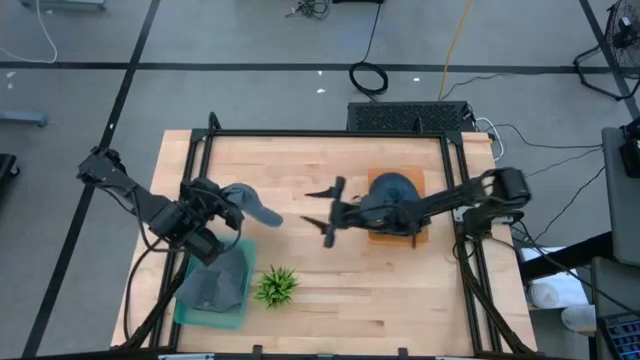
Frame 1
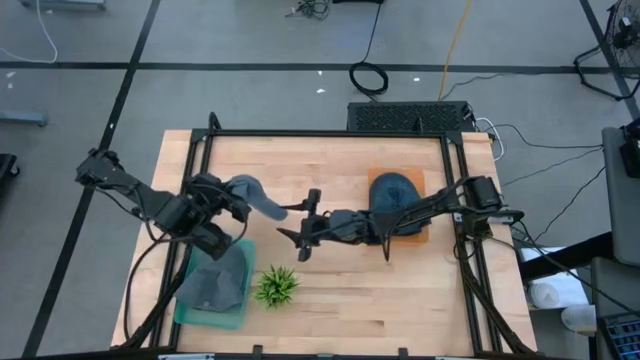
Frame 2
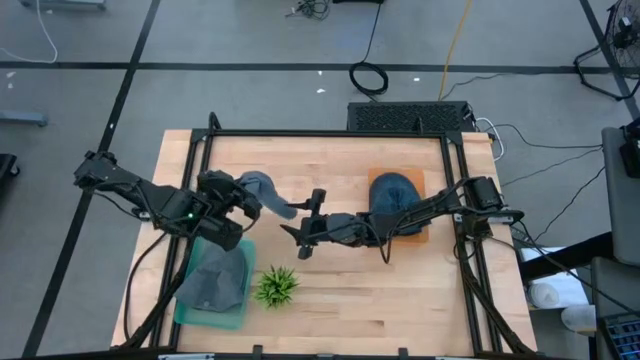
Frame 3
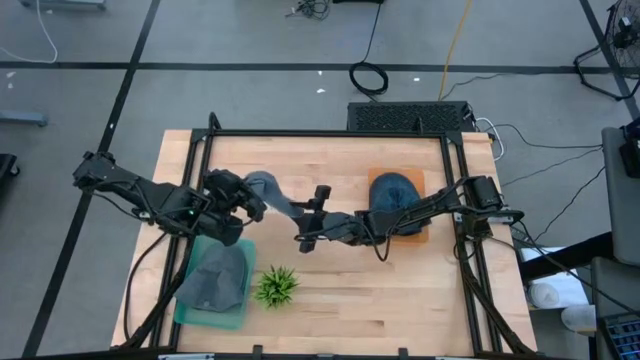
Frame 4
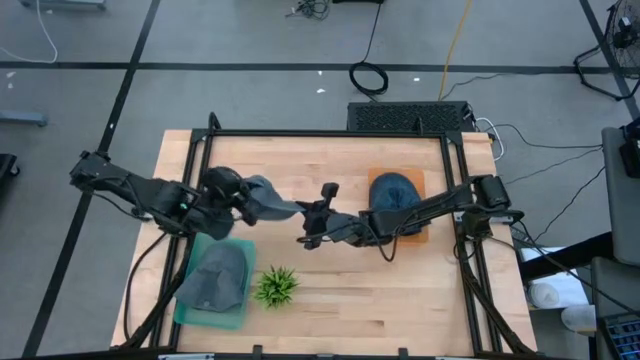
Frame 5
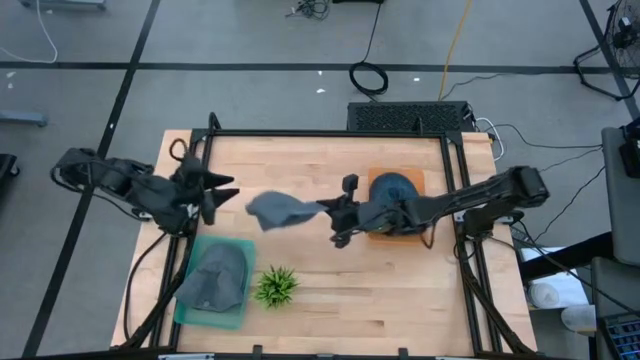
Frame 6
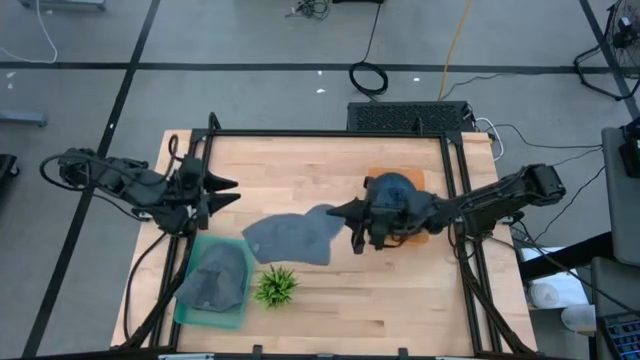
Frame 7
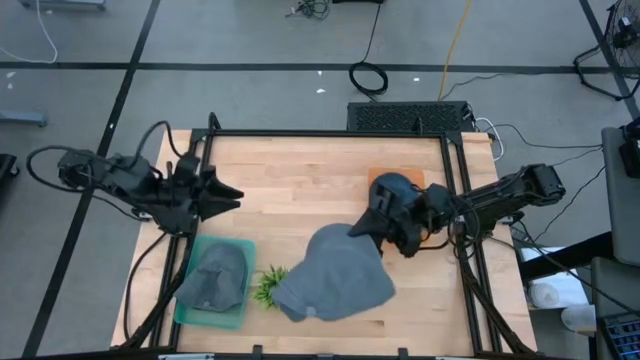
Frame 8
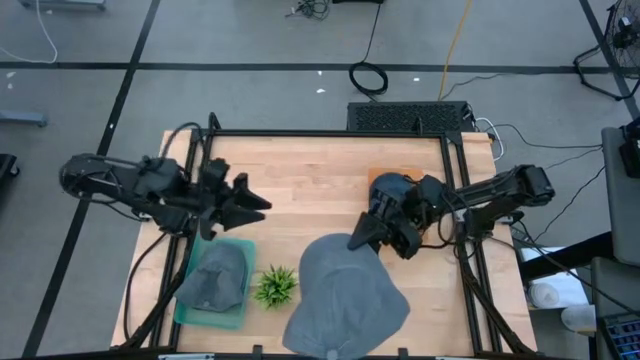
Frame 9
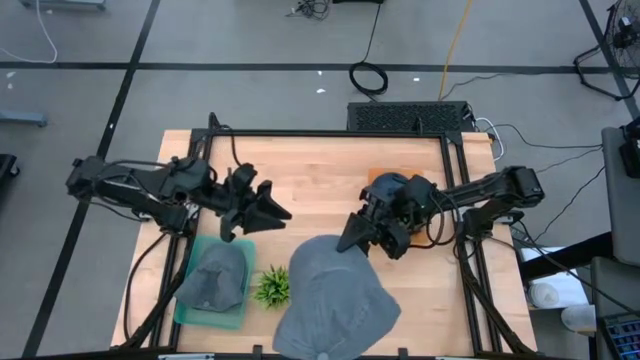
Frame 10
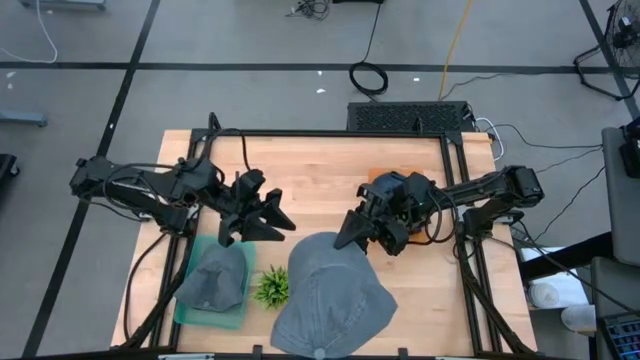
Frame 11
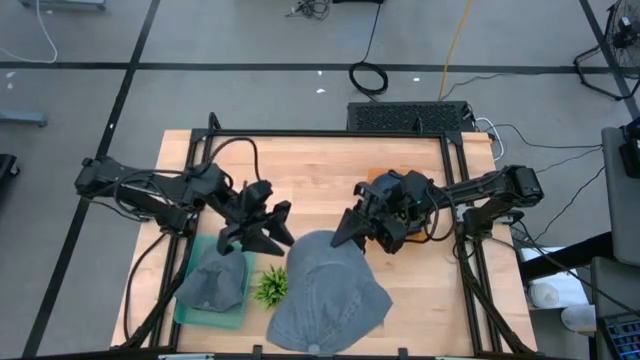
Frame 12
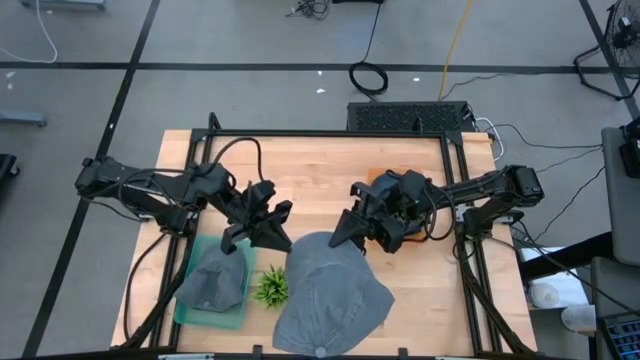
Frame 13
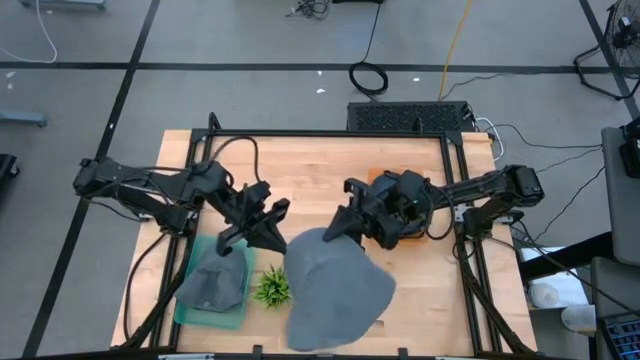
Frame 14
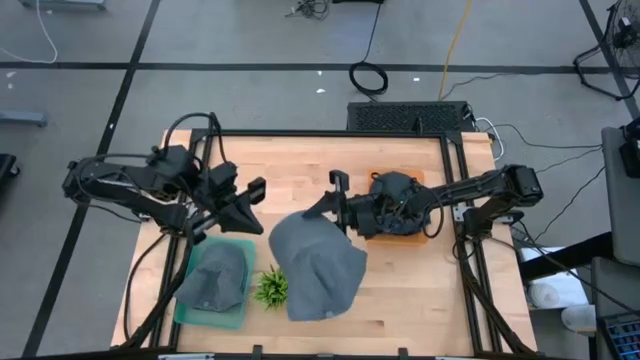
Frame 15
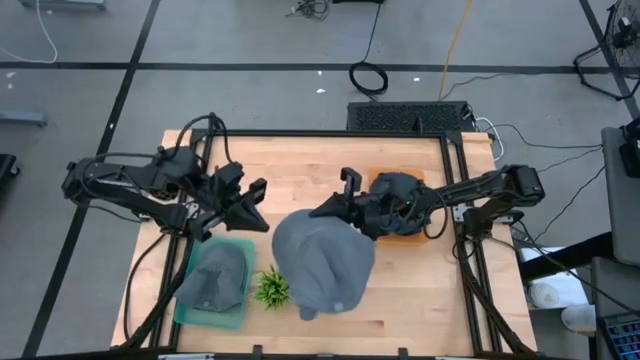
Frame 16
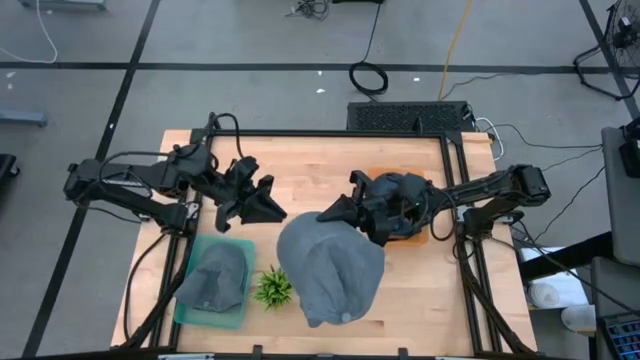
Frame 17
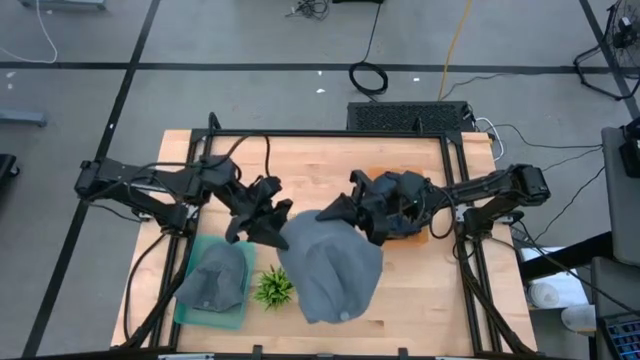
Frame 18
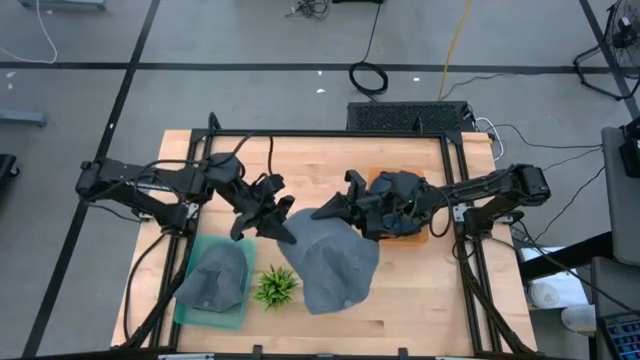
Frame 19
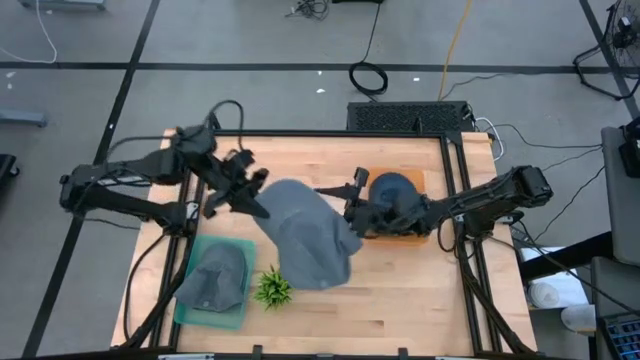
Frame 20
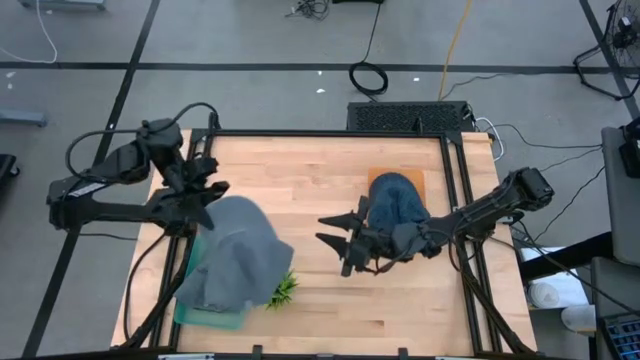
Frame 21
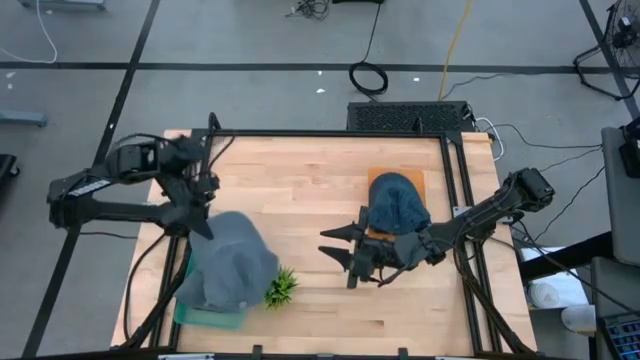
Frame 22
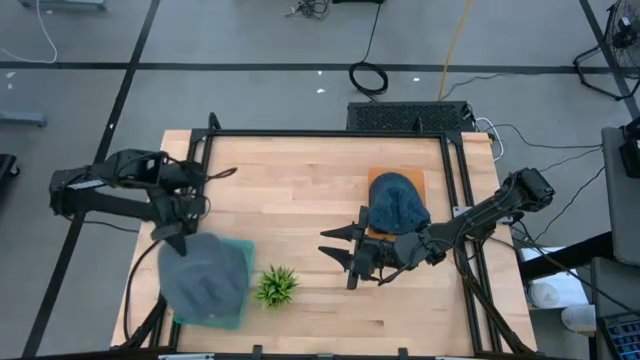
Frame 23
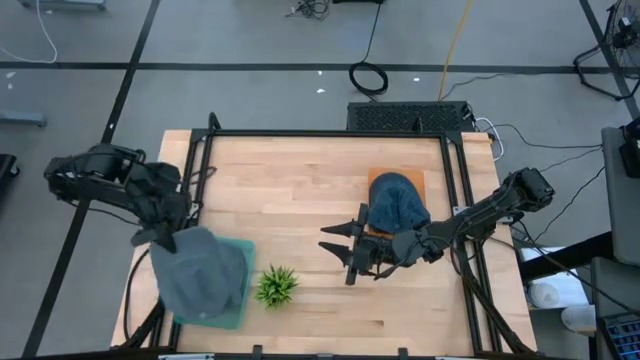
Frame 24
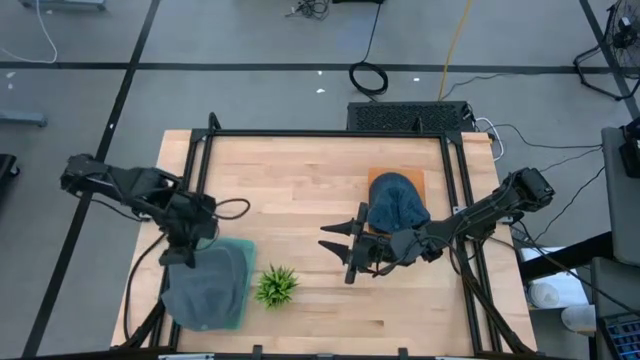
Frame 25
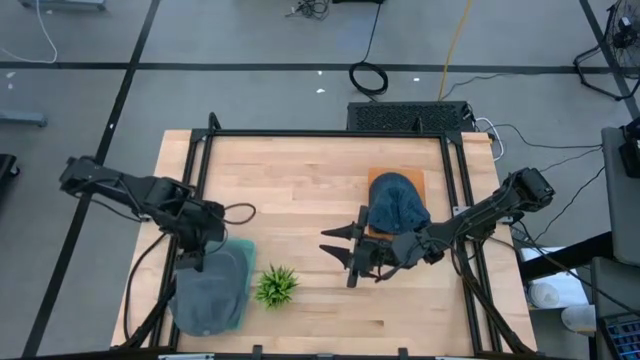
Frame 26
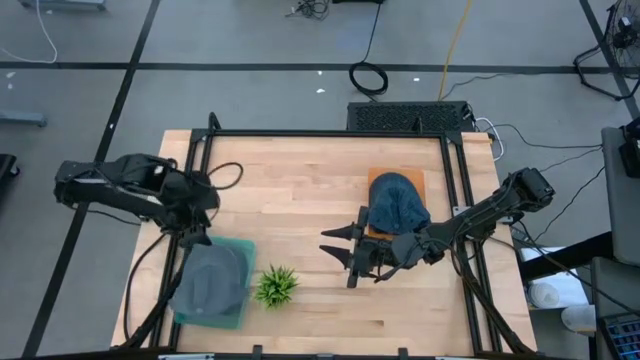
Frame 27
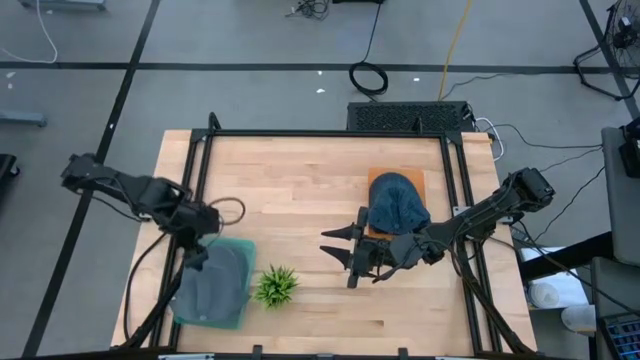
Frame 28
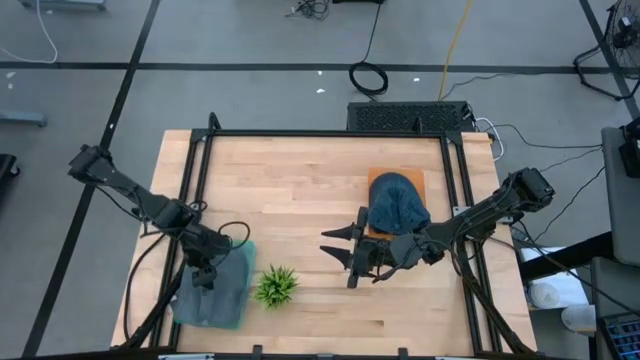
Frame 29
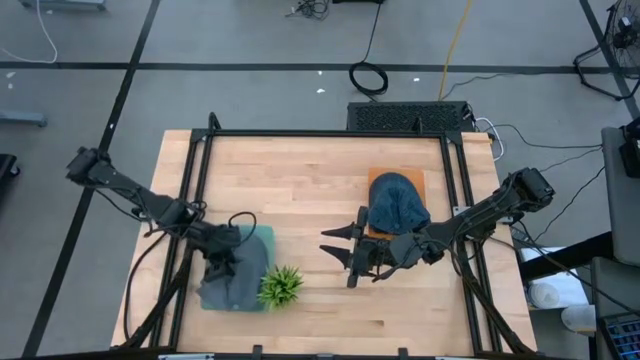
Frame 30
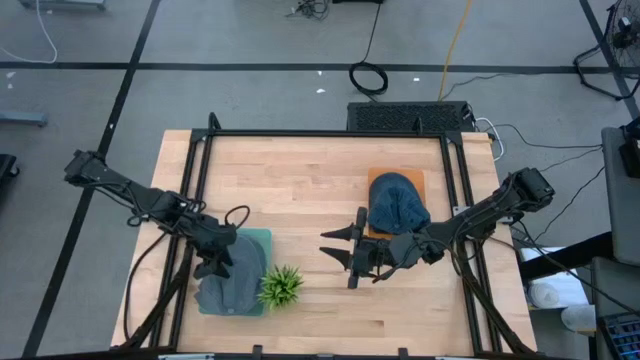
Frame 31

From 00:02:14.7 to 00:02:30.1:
Task: Pick & Place hat
Put the gray cap into the green bin

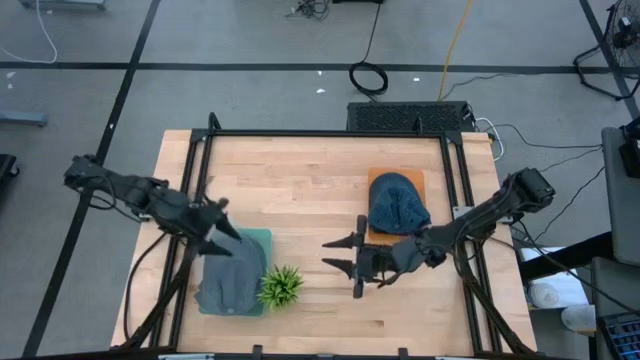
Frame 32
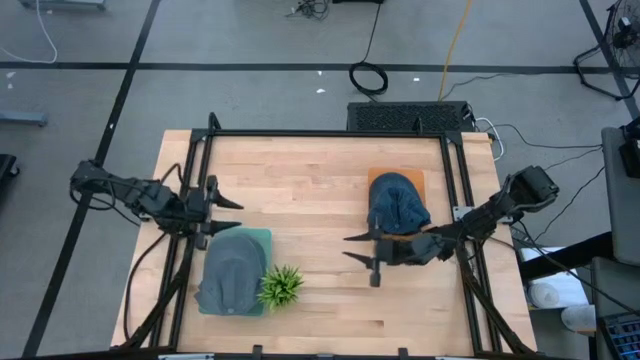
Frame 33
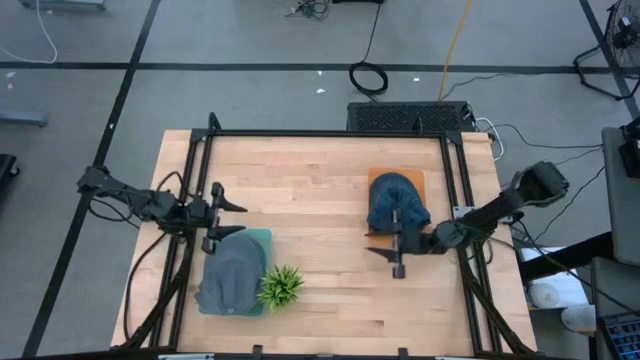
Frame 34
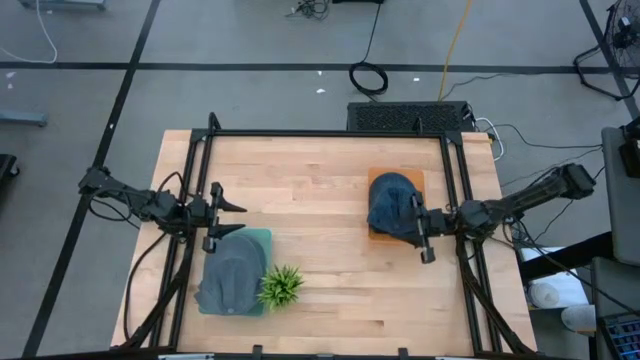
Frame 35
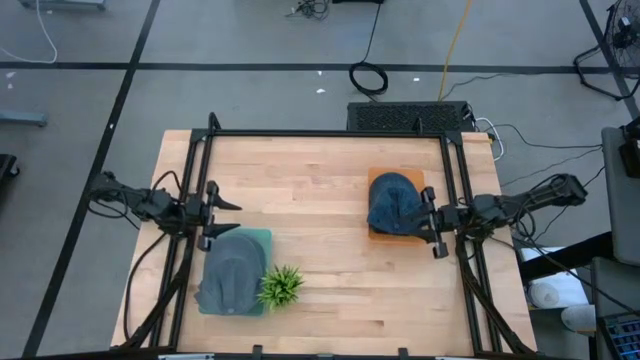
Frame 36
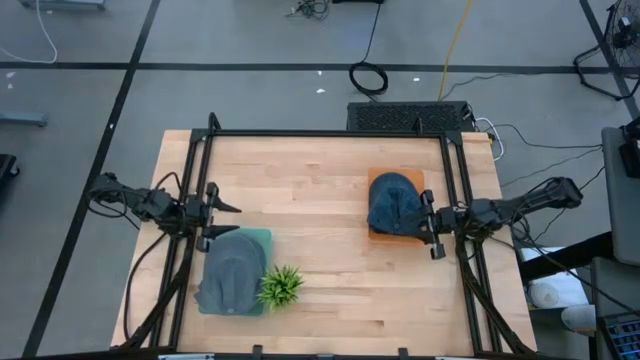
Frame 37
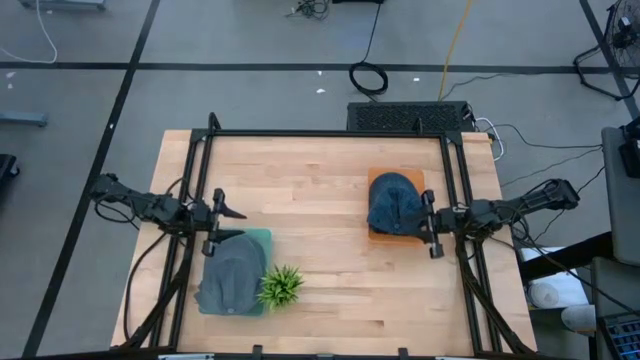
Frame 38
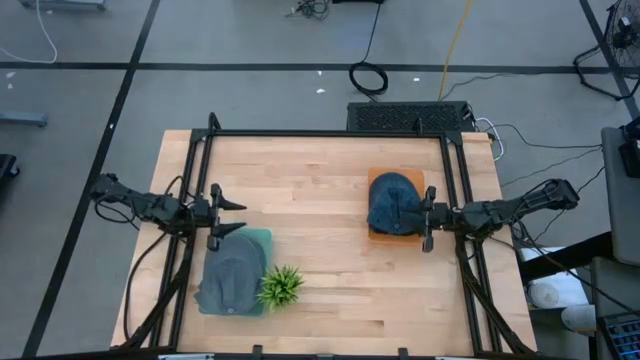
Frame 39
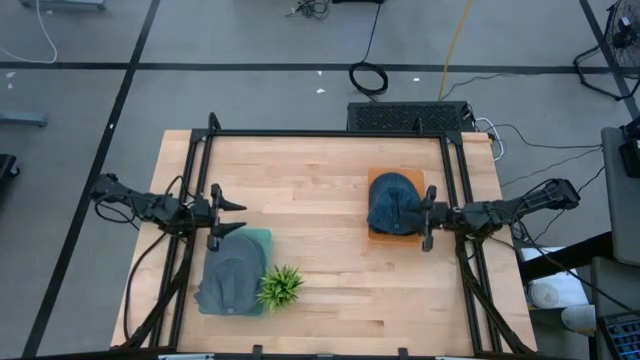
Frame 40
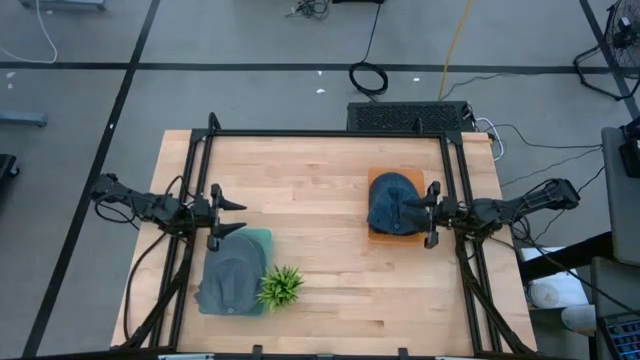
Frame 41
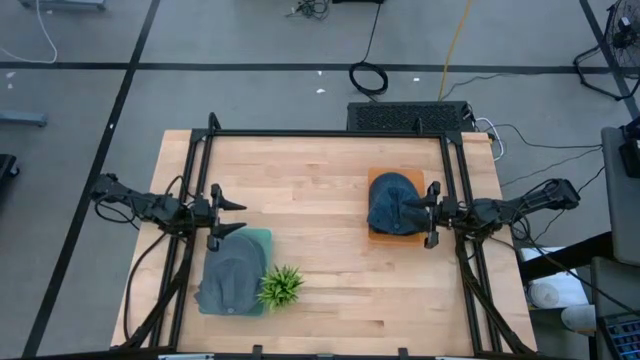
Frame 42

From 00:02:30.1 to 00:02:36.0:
Return to Home Position

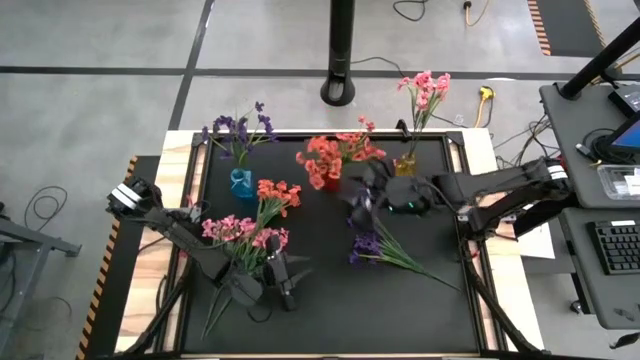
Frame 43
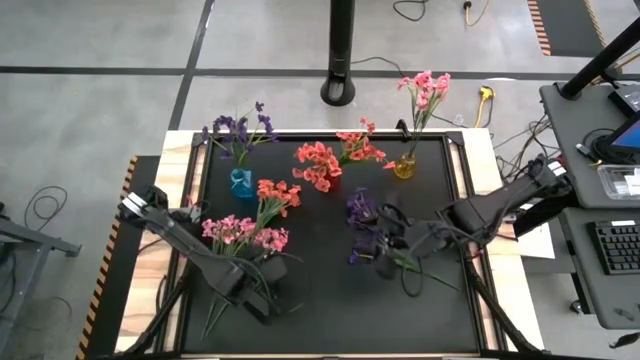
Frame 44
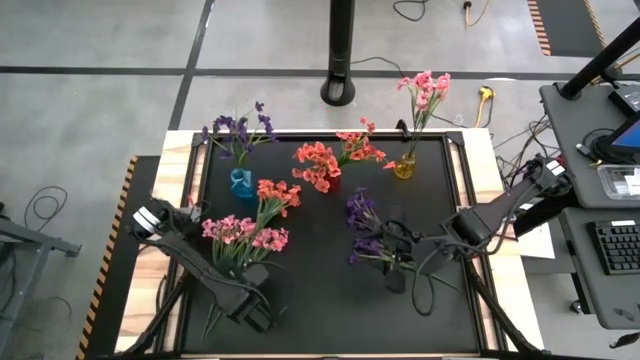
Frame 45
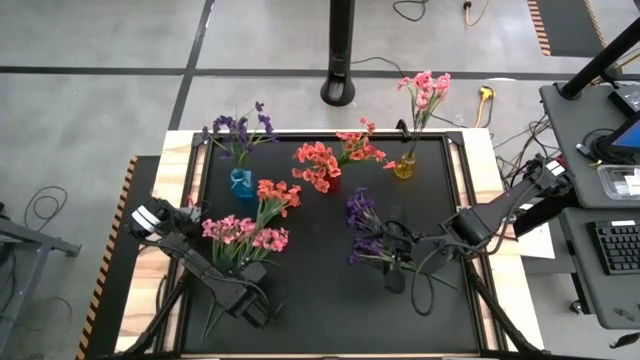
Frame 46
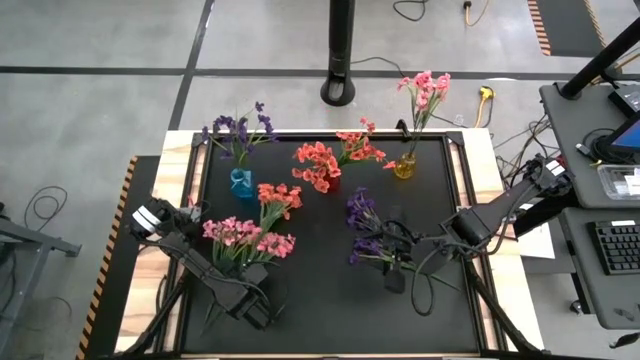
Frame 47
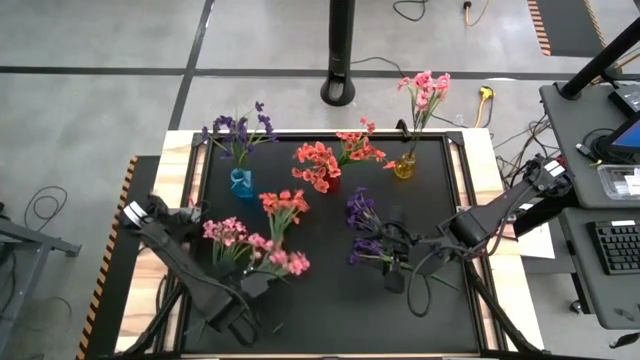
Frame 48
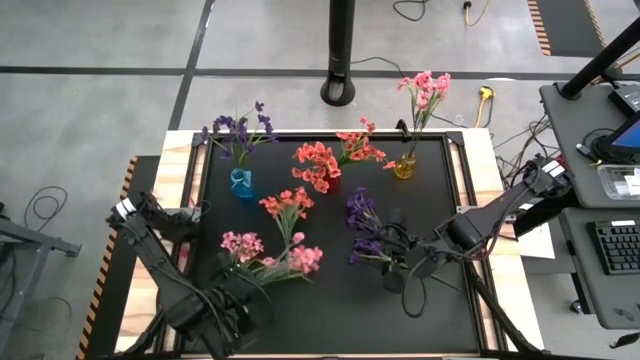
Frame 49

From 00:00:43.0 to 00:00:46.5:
Task: Sort flowers into vase by color
Put the right pink flowers into the yellow vase
